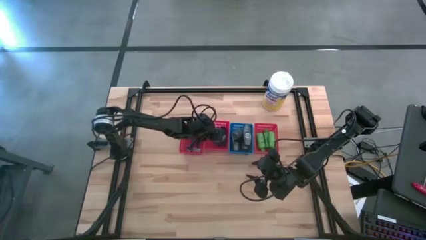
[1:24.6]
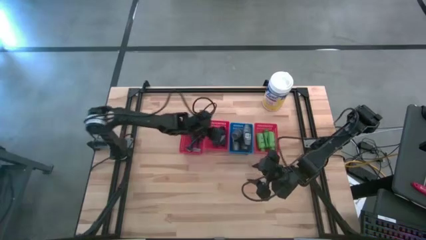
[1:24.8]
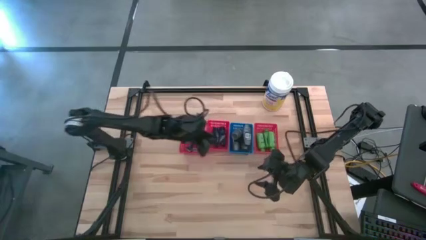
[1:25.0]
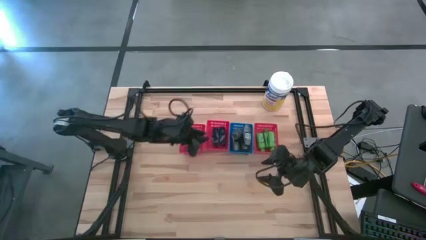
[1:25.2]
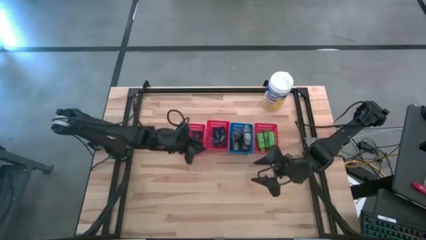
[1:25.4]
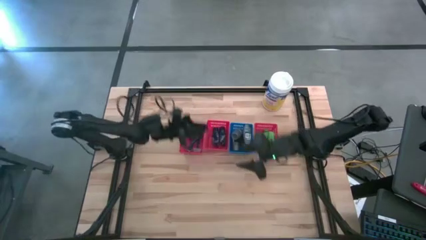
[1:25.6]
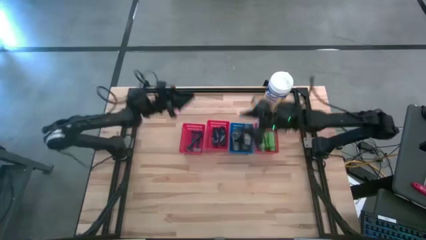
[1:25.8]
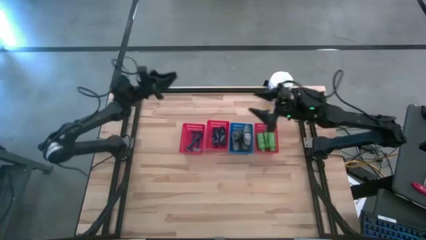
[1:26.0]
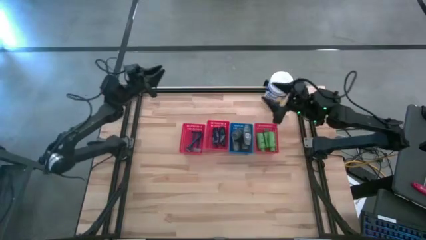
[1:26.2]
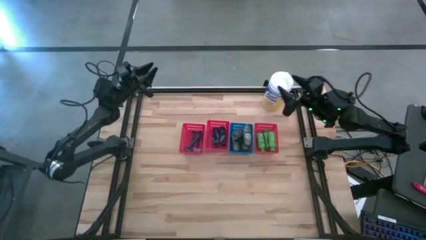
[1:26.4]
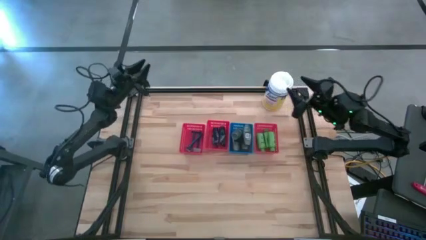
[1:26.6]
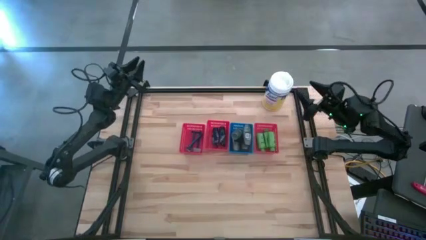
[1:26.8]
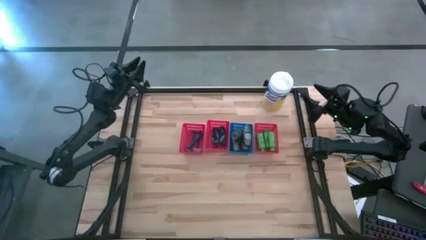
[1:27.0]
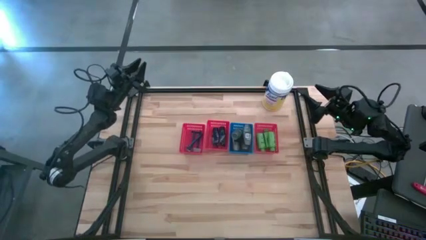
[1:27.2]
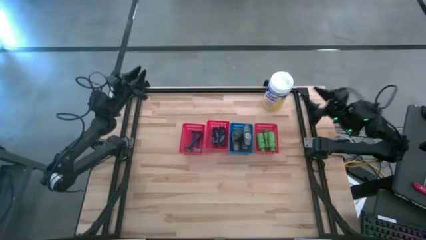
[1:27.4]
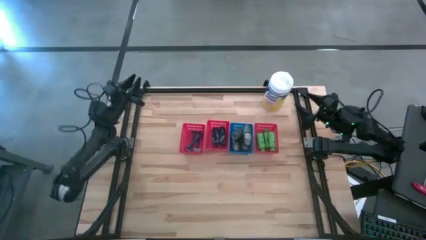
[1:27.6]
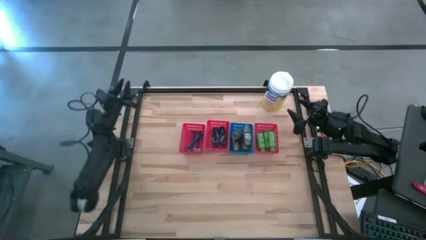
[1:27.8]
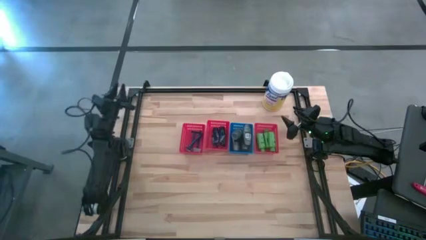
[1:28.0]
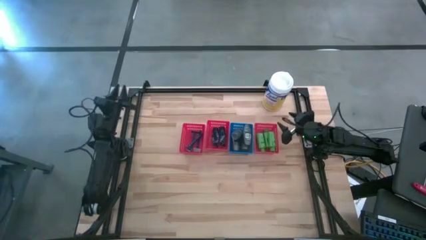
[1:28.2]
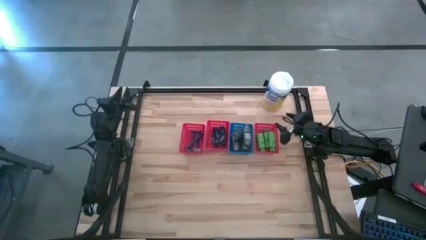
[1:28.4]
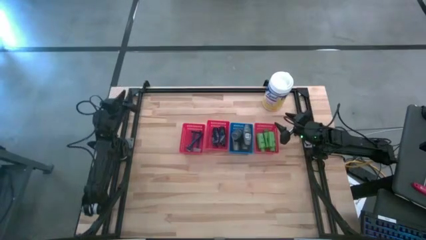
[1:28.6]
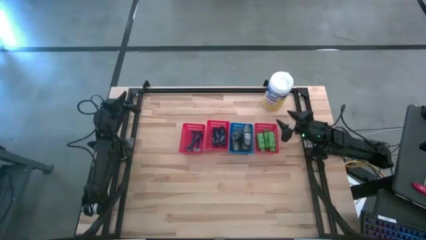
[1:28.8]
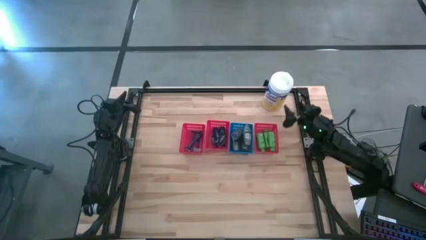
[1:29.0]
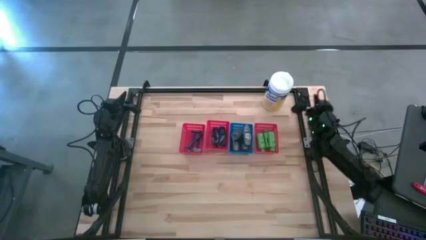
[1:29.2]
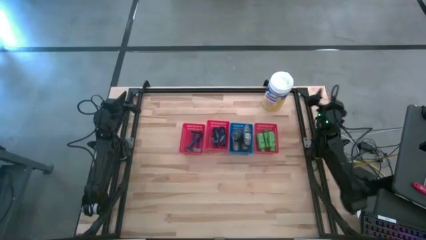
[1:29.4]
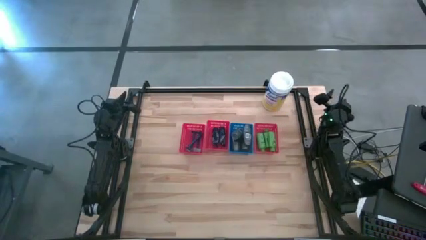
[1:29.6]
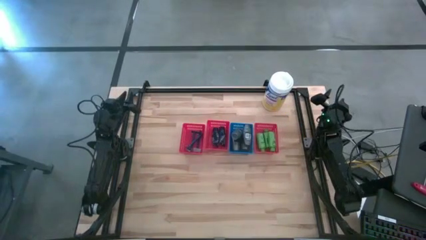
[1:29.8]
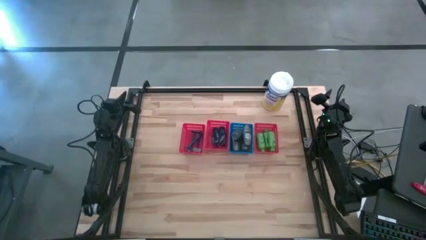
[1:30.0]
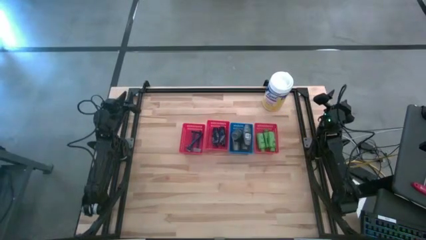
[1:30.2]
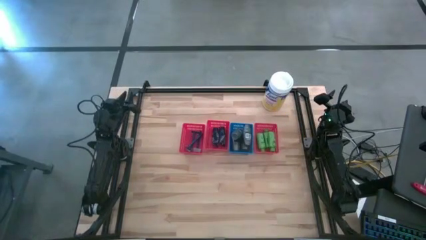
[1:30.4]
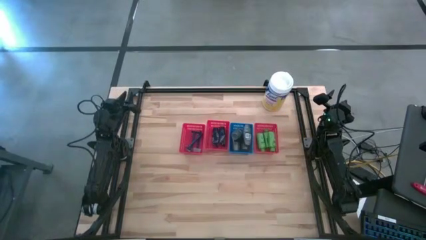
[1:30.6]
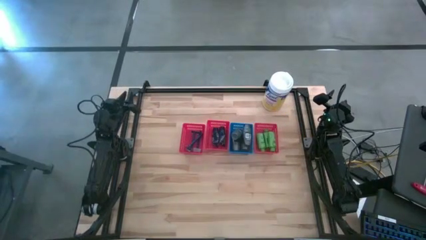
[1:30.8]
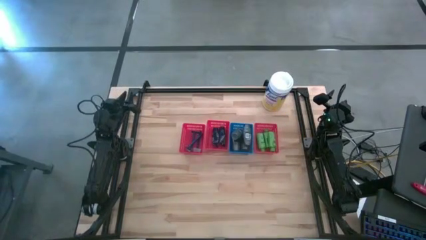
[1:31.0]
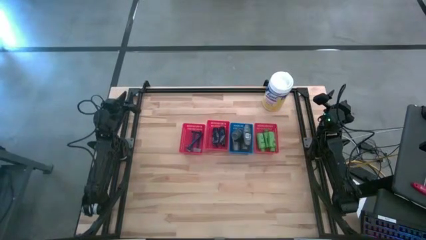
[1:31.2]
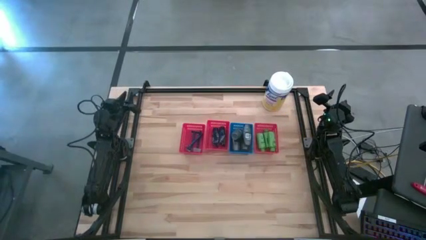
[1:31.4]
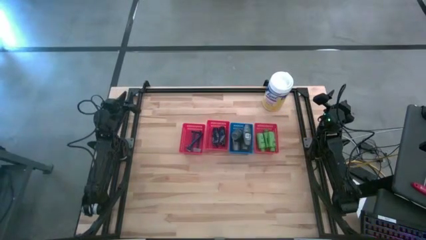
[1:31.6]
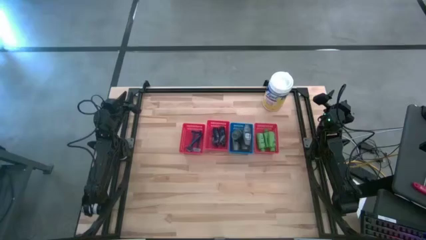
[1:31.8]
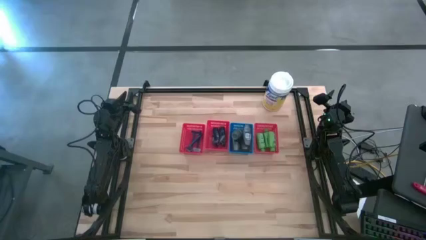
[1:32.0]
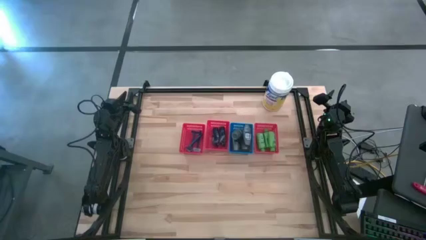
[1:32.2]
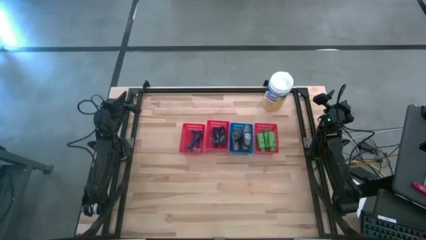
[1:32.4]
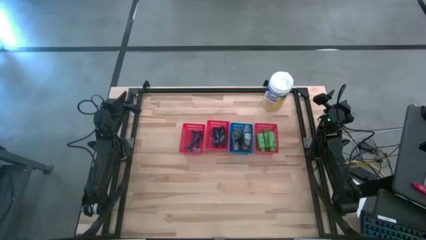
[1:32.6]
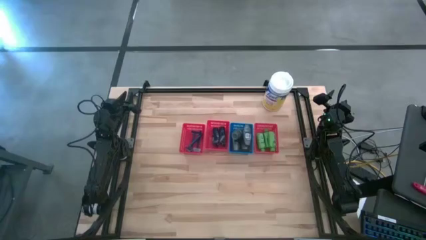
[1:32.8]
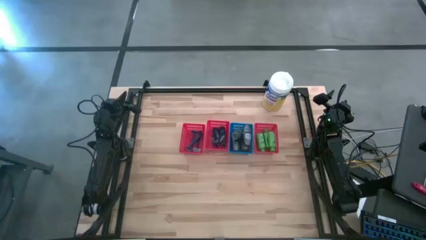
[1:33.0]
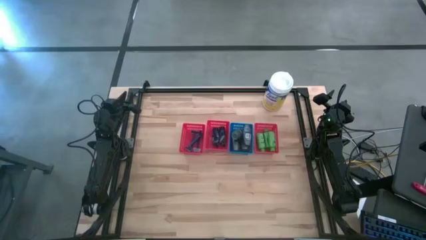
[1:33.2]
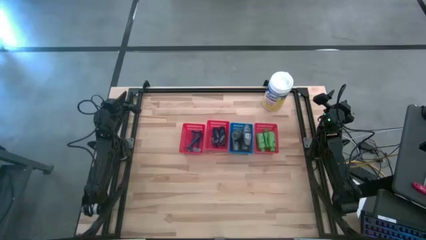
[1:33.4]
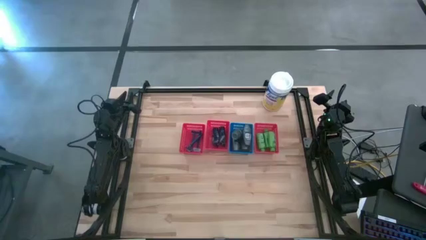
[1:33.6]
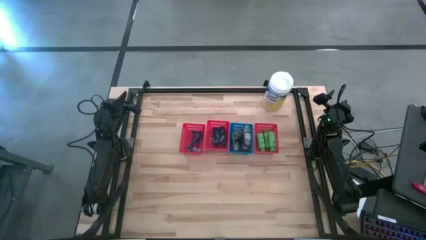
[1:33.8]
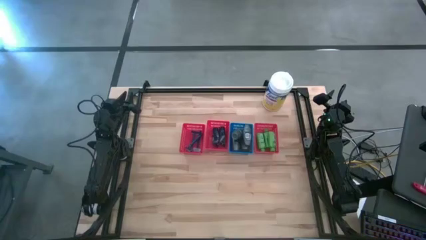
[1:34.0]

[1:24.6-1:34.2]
Task: Pick & Place Travel size toiletries
Return to Home Position

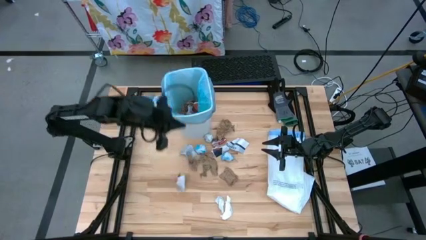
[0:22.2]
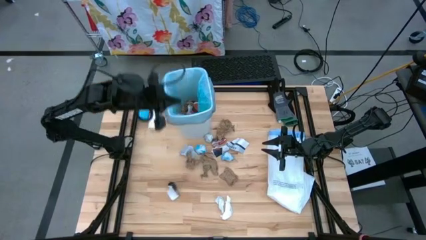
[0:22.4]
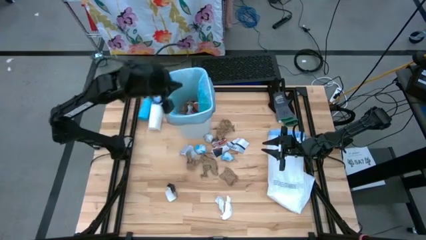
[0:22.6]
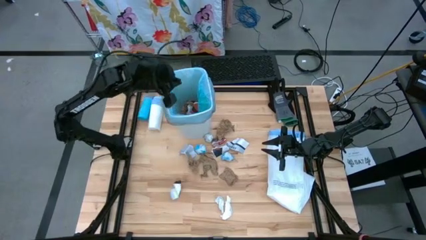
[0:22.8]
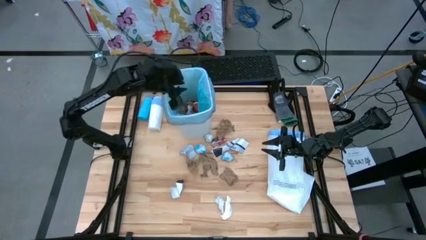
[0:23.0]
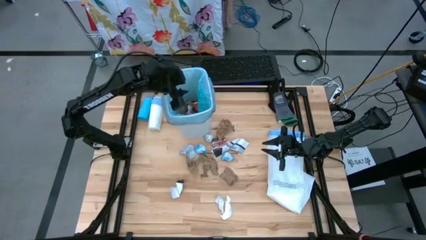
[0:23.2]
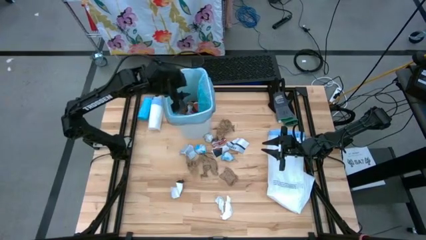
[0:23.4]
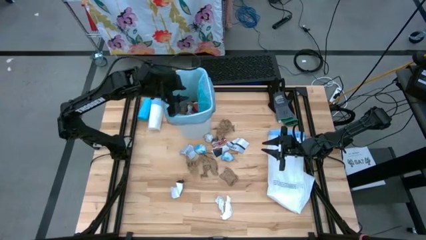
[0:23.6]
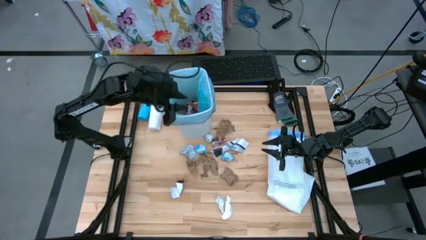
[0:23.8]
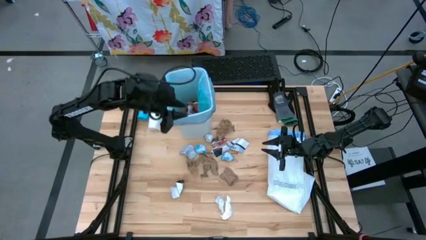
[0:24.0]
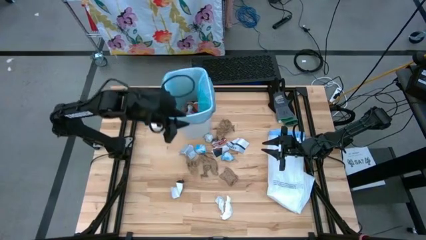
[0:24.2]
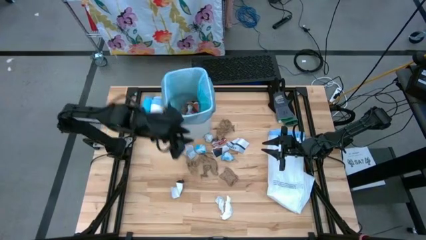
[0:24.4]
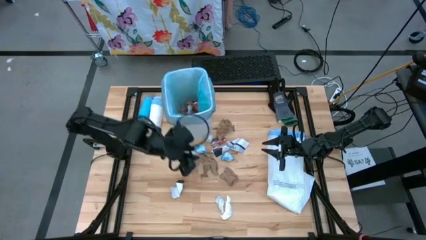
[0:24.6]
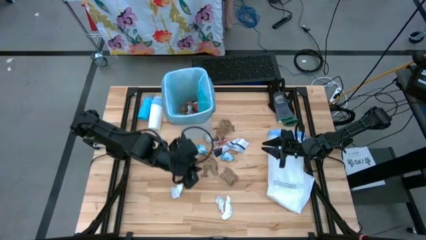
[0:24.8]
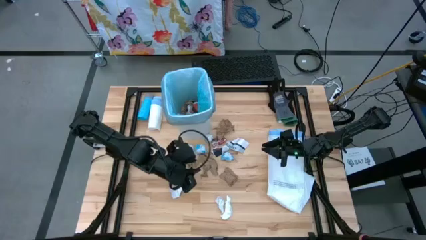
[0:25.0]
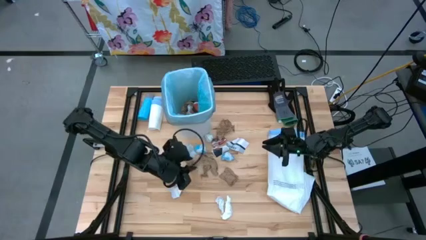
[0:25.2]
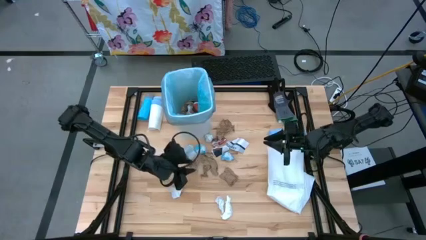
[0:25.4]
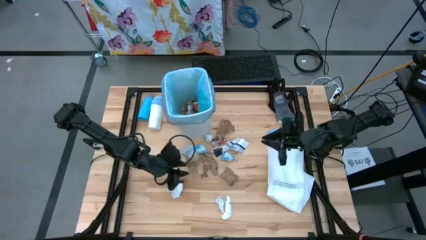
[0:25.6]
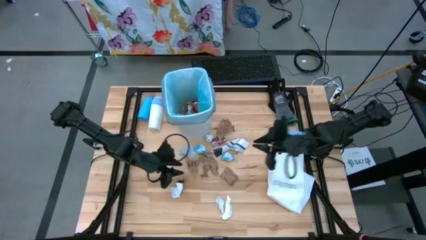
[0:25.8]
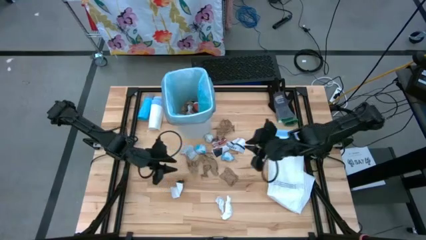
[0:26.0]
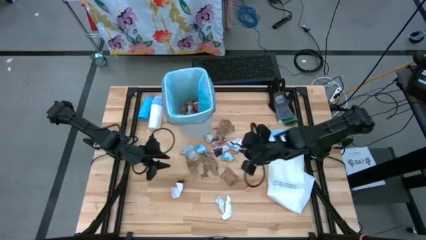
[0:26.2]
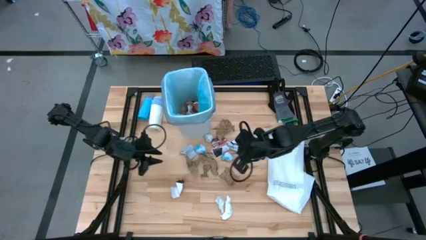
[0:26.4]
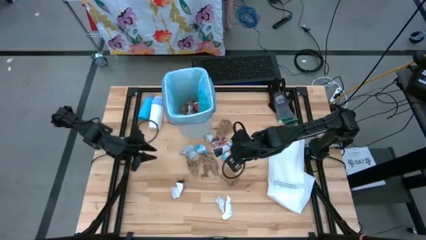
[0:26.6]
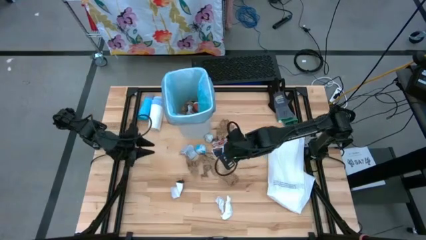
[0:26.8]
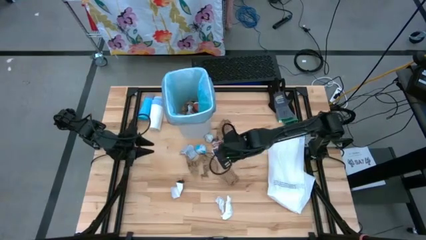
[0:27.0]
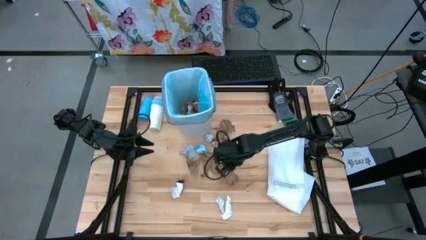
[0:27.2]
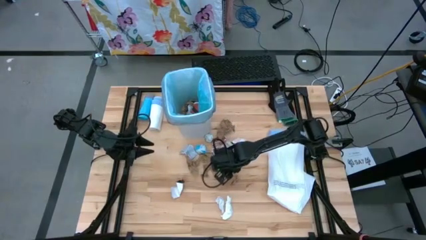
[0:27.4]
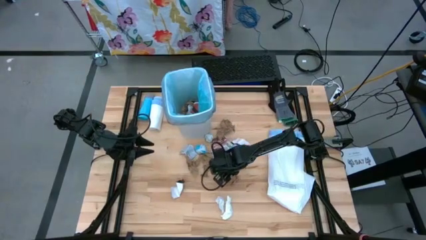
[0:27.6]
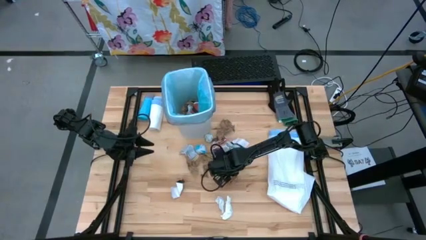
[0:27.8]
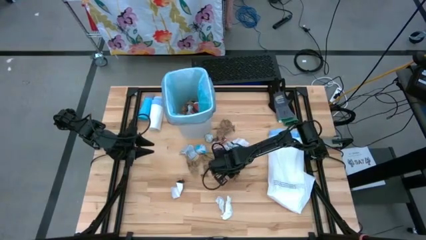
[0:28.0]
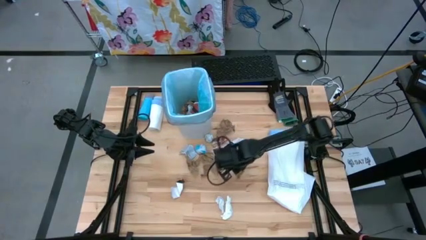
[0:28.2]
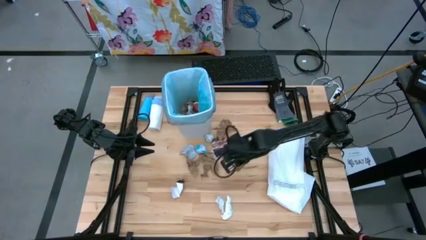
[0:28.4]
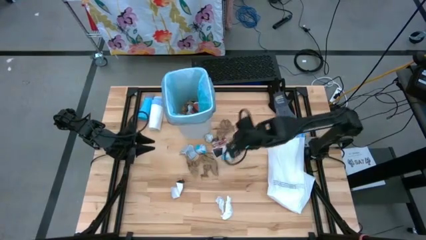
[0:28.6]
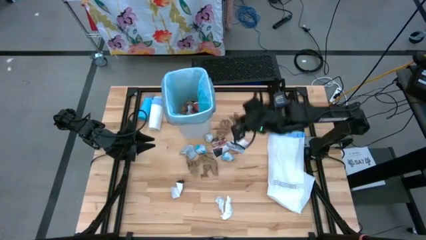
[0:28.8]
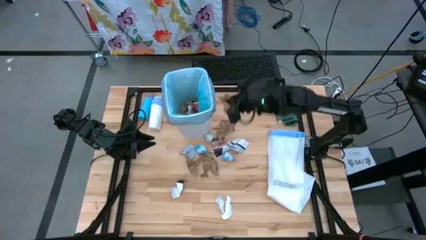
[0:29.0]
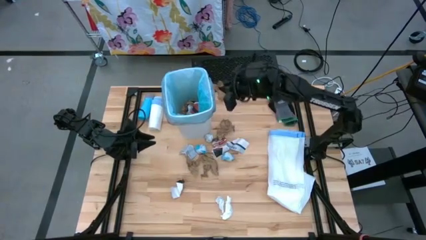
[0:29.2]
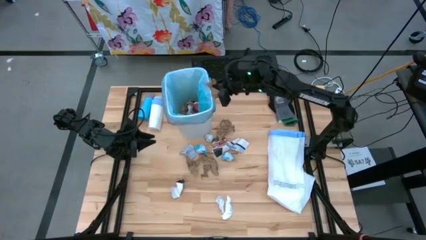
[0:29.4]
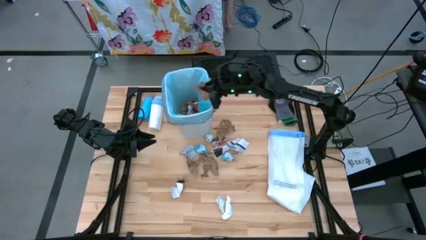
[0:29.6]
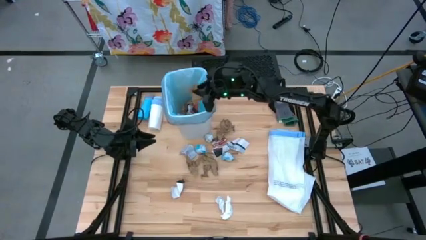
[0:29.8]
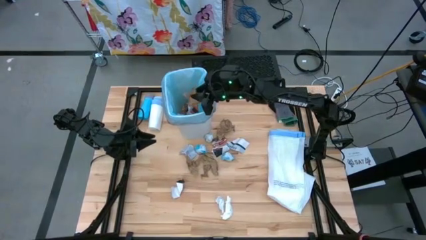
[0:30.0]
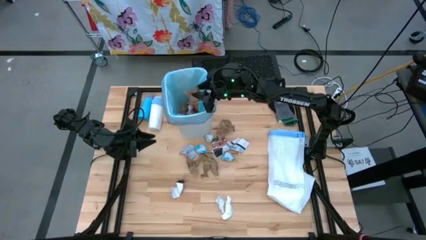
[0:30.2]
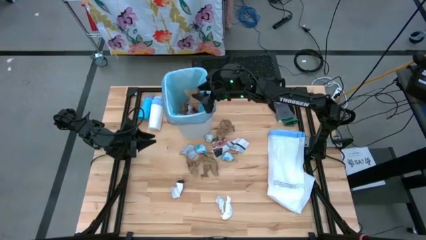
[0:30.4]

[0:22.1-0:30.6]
Task: place trash/remove bag and relplace
Put the brown napkin into the white trash bin
